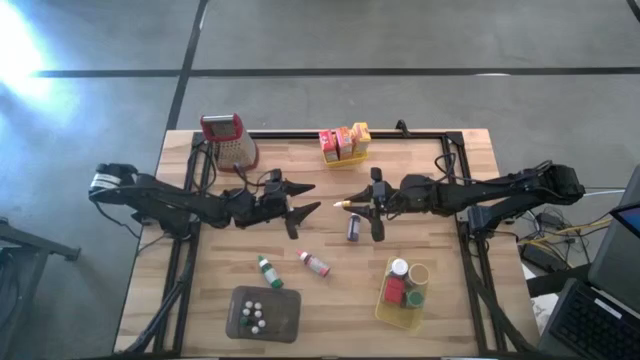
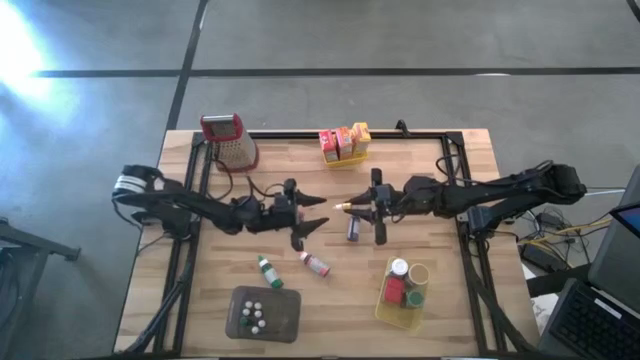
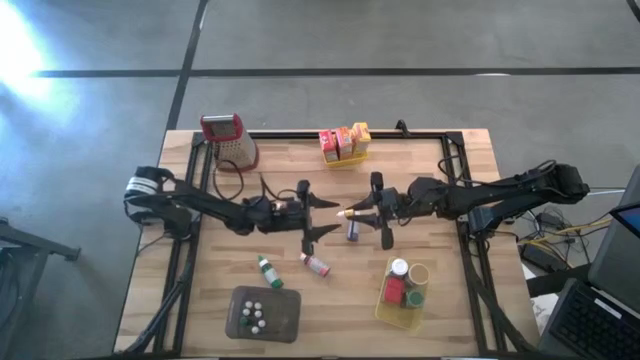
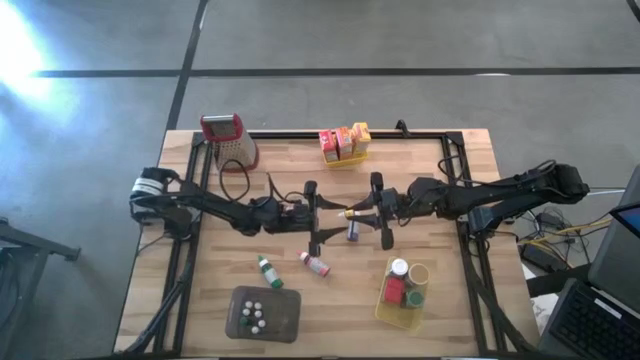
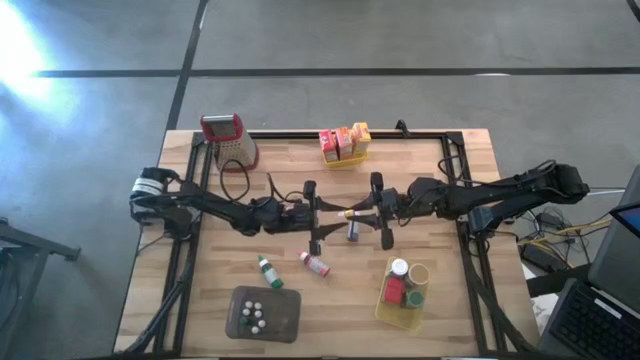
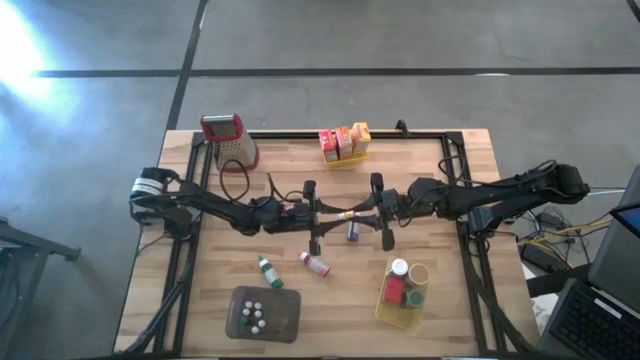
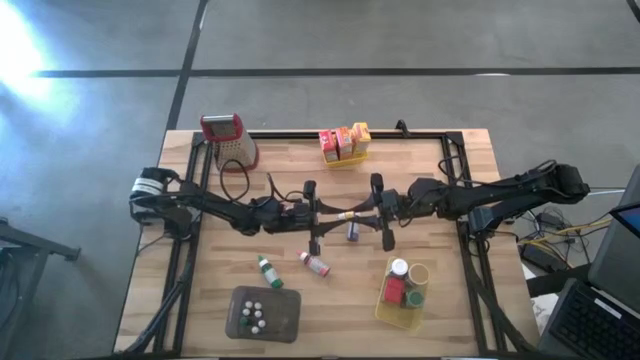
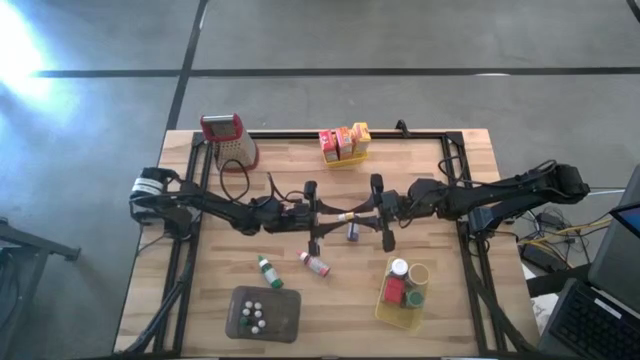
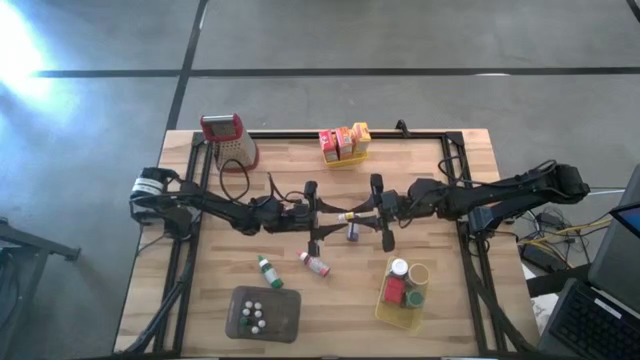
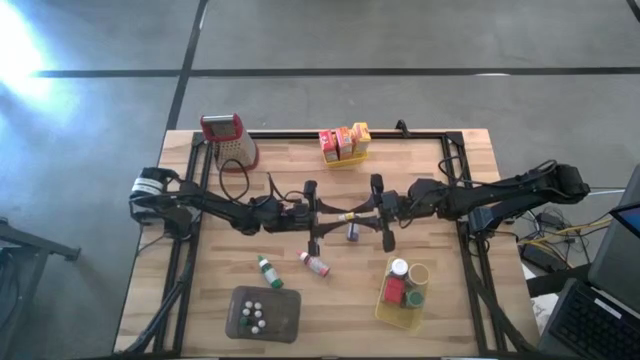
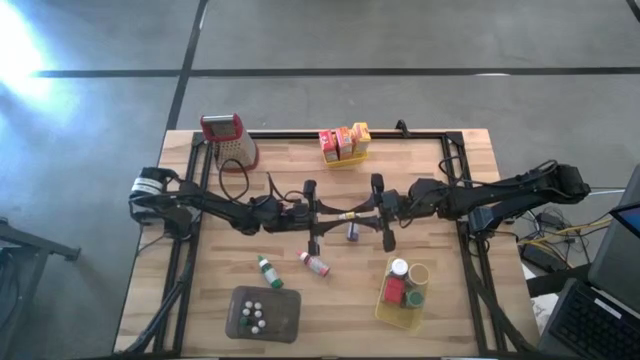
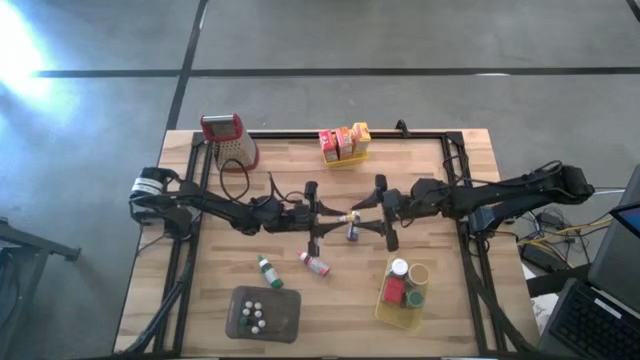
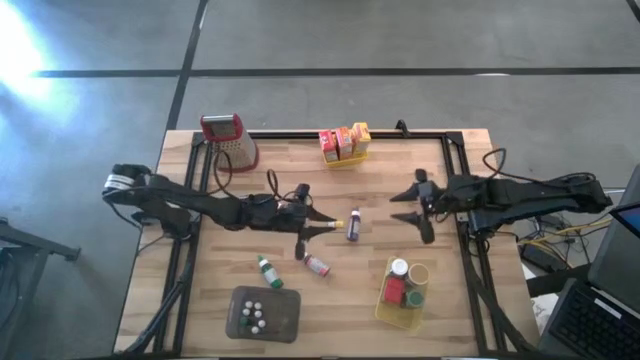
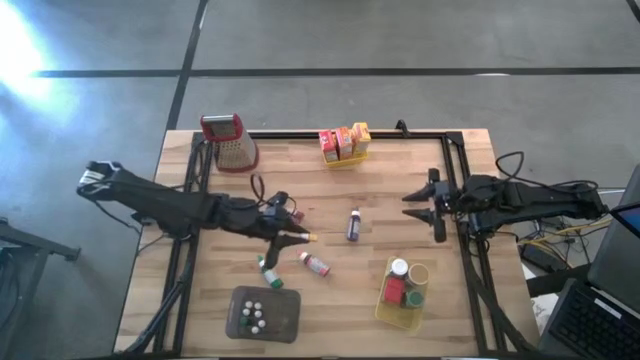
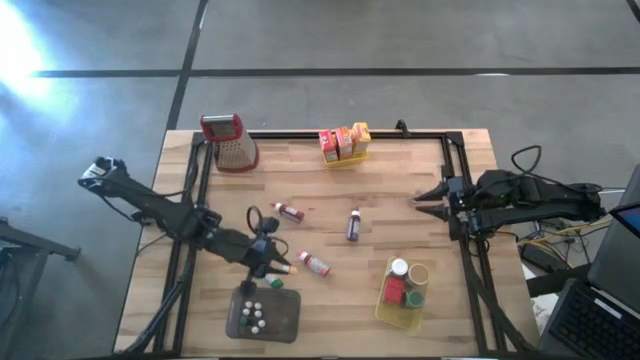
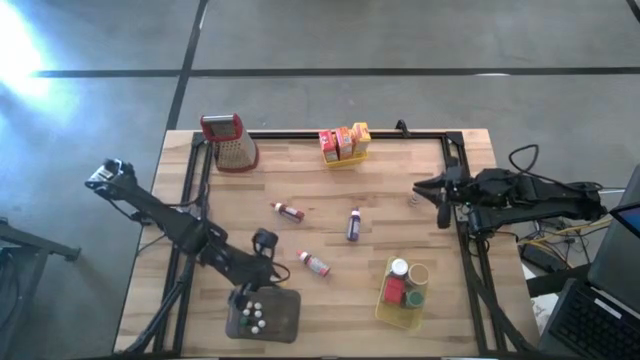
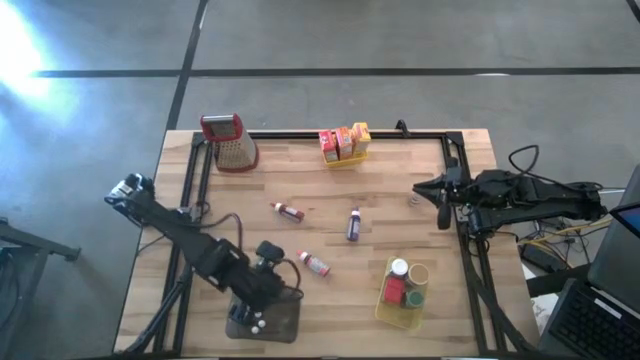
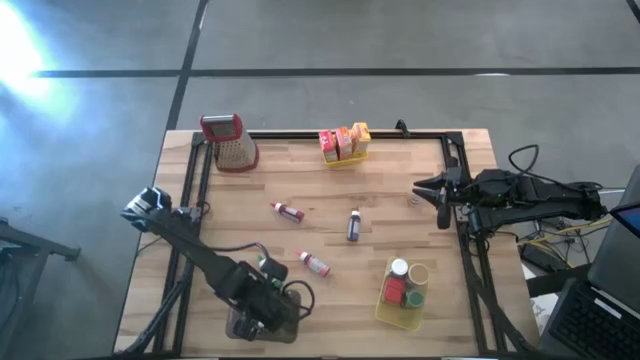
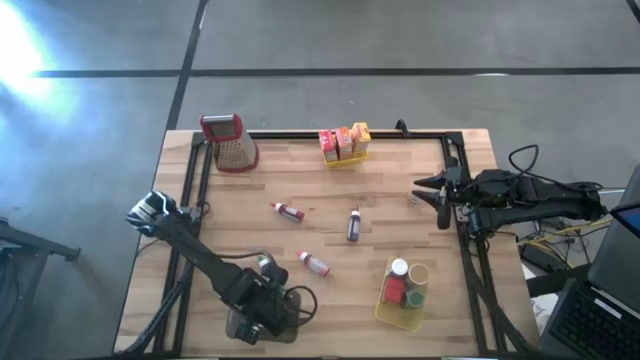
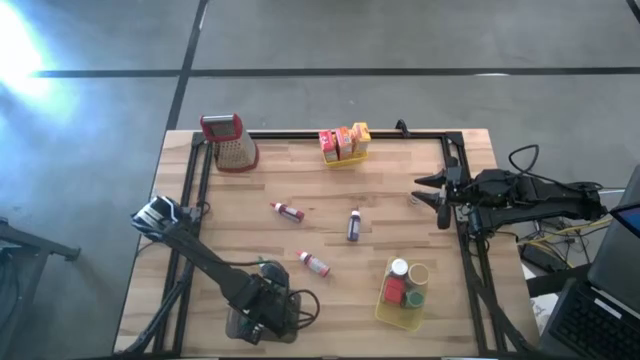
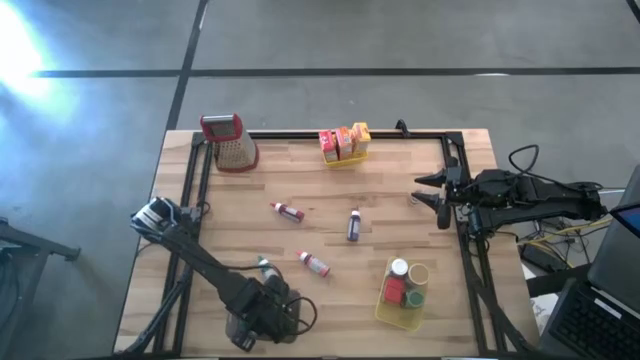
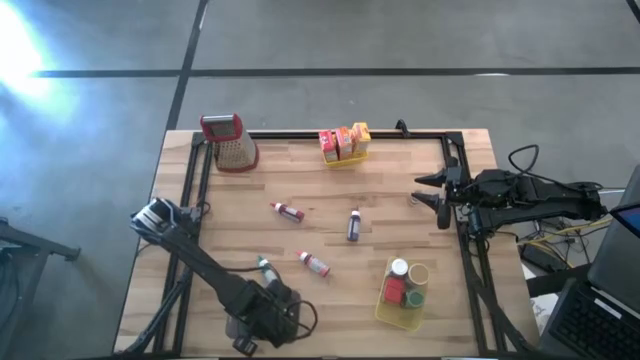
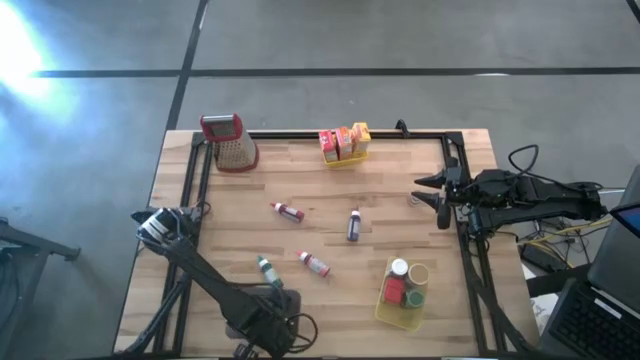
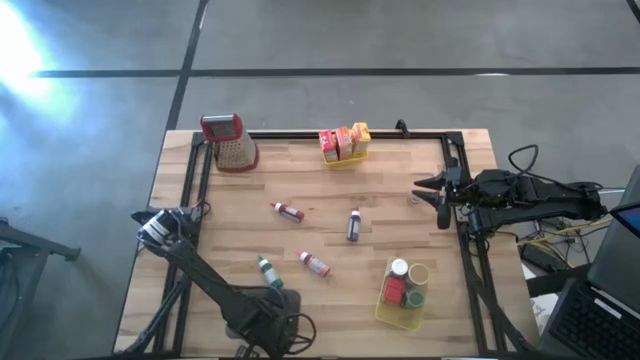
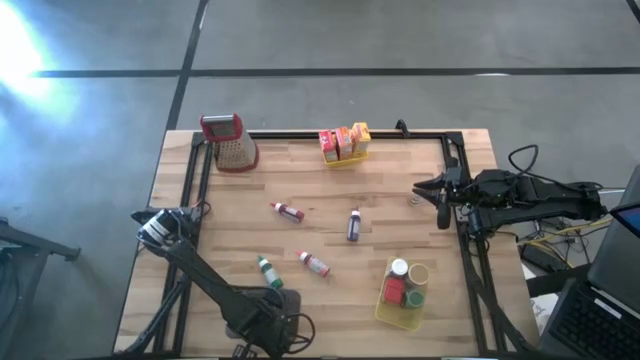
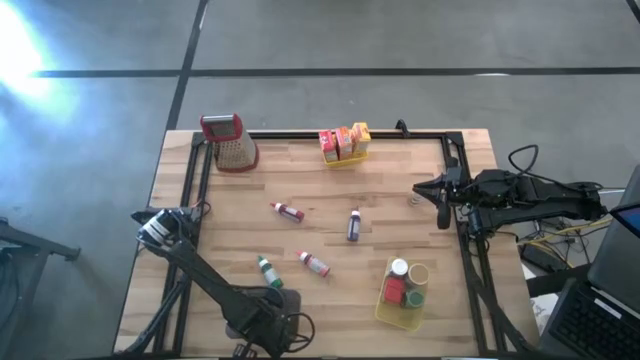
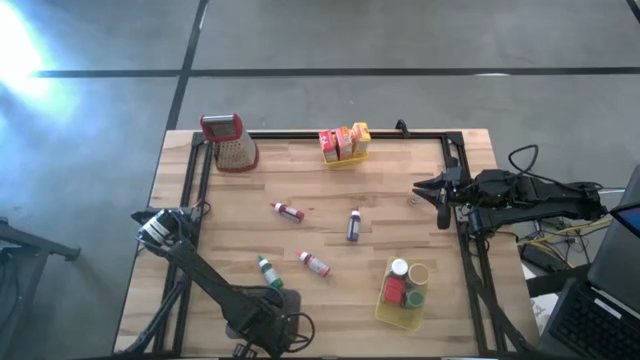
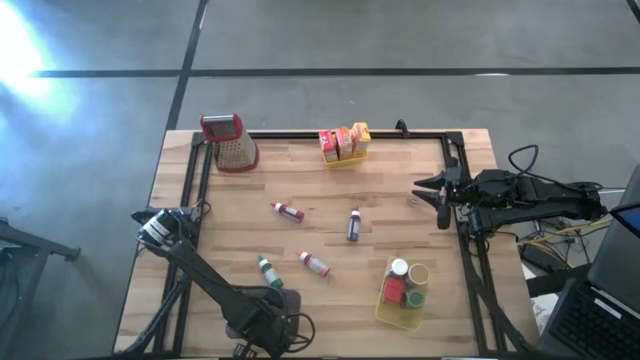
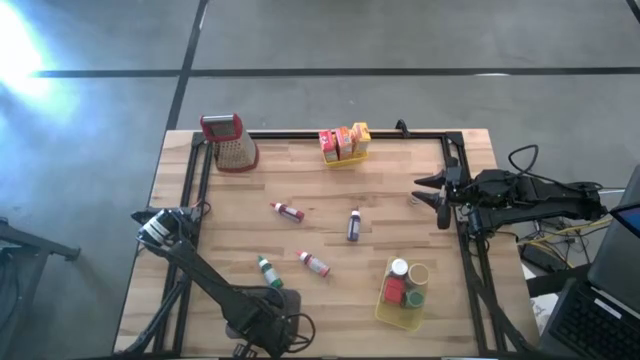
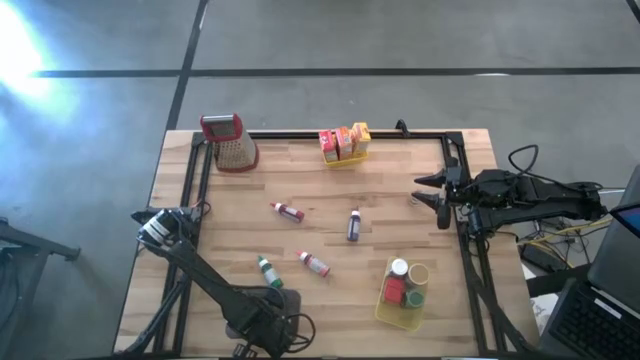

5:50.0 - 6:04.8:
Task: Pick & Place Kitchen Items
Put the orange food coloring bottle into the black bin

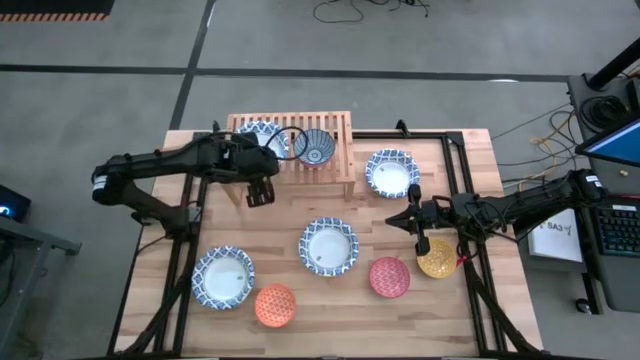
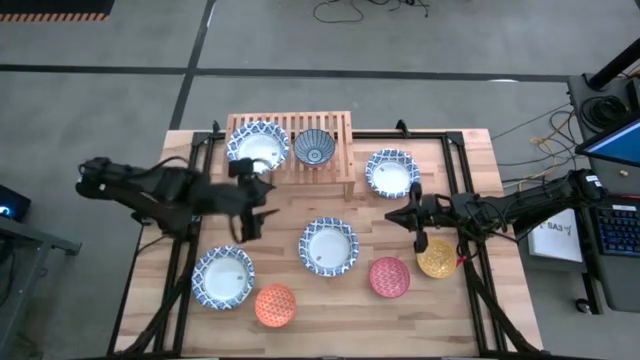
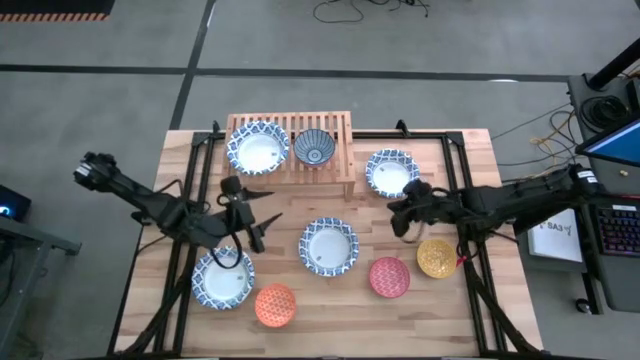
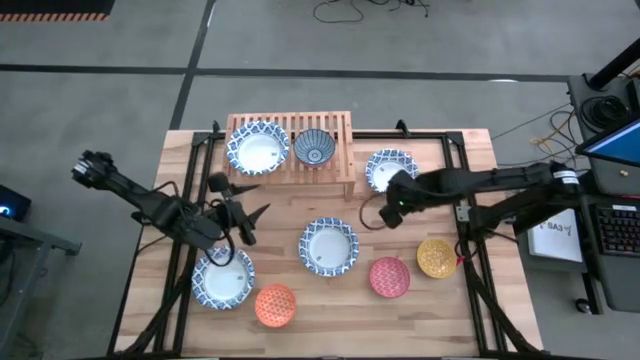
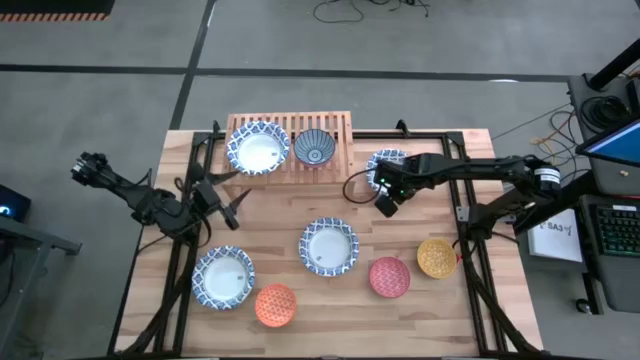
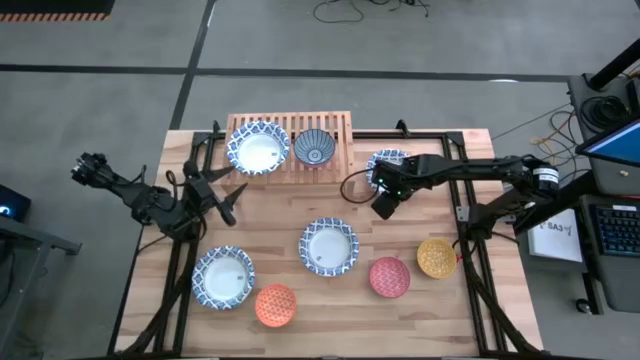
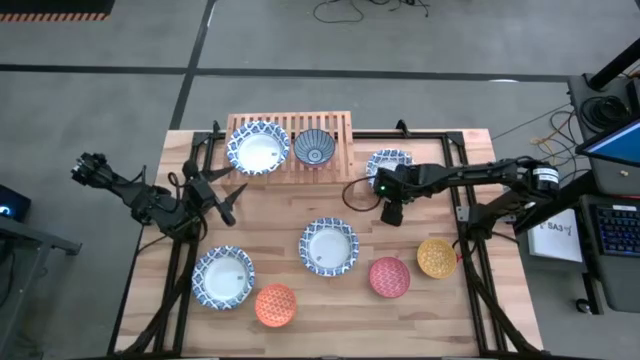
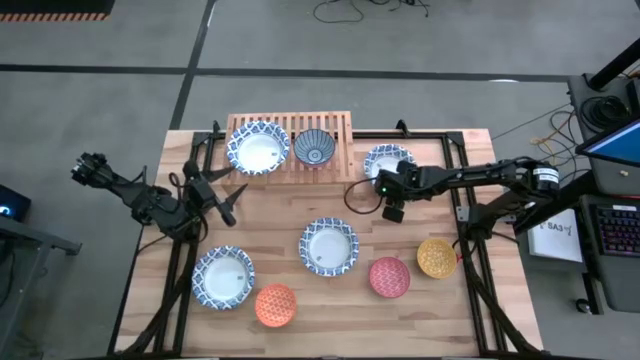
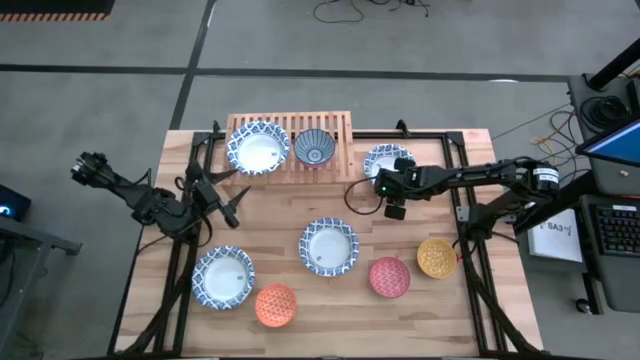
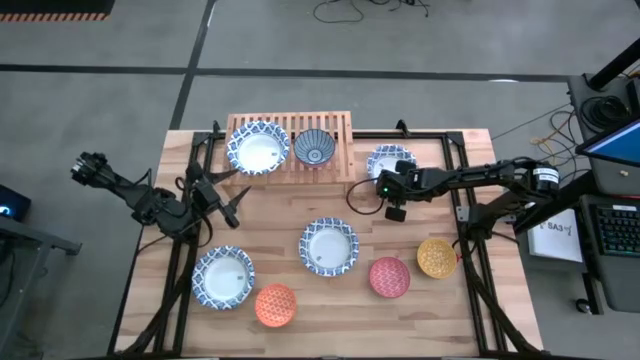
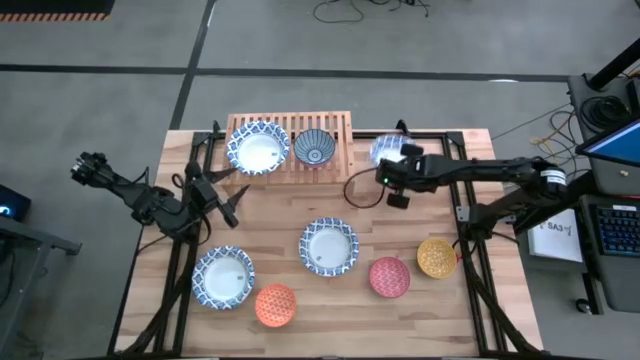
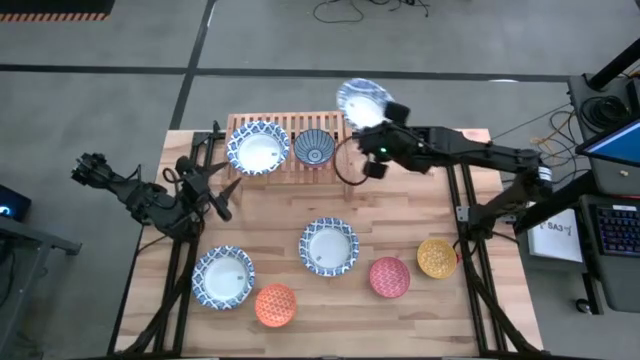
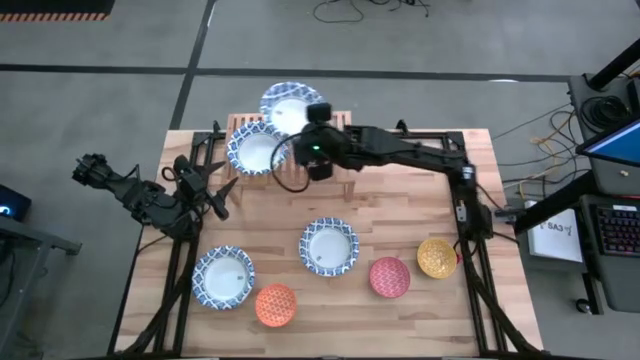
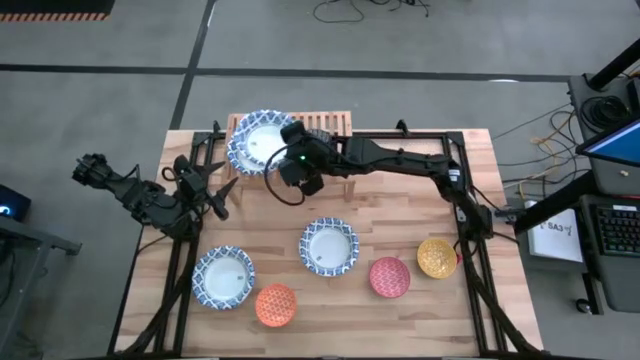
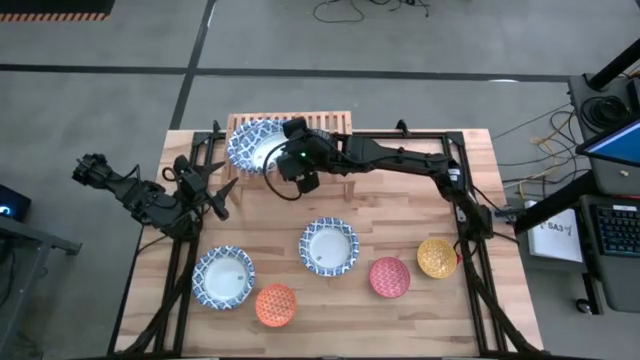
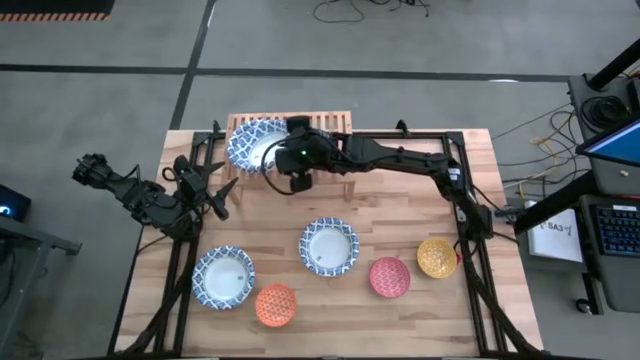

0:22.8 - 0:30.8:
Task: Place and stack bowls onto a shelf
Stack the white pattern bowl on top of the other white pattern bowl on the shelf
